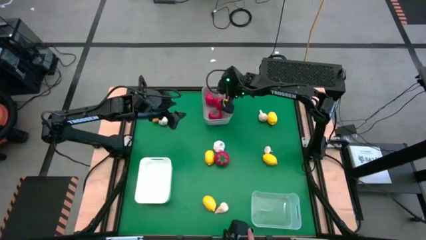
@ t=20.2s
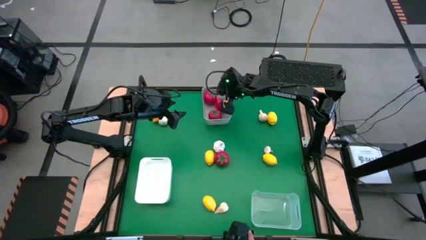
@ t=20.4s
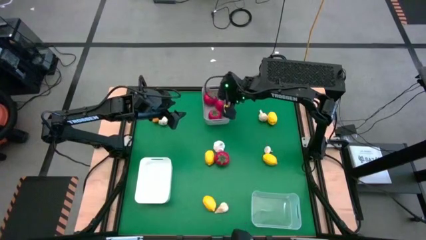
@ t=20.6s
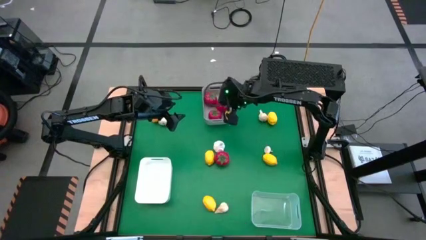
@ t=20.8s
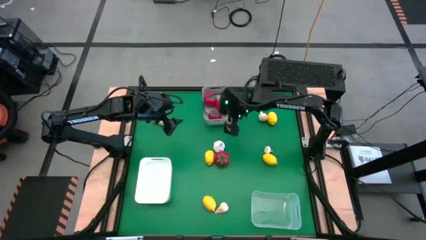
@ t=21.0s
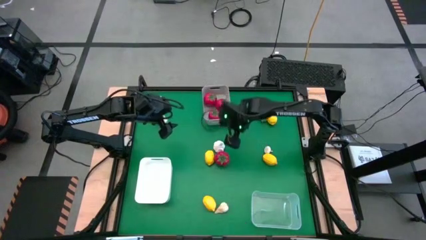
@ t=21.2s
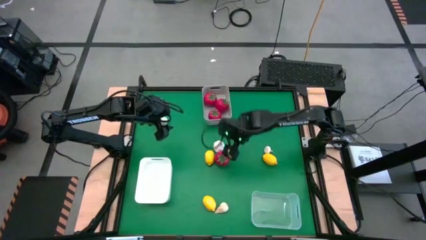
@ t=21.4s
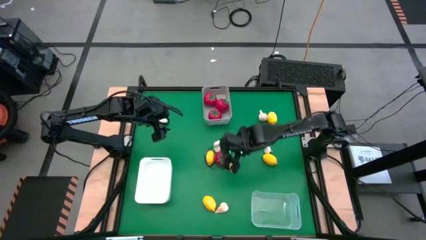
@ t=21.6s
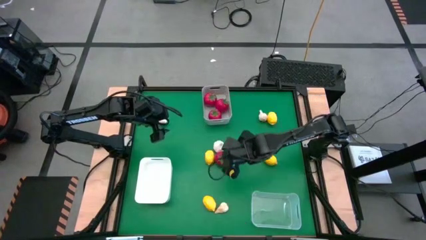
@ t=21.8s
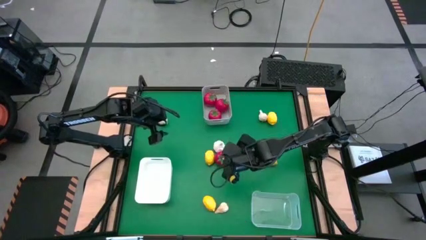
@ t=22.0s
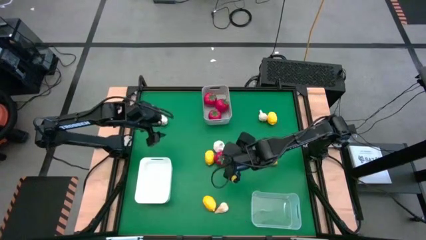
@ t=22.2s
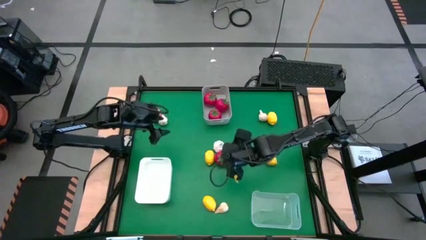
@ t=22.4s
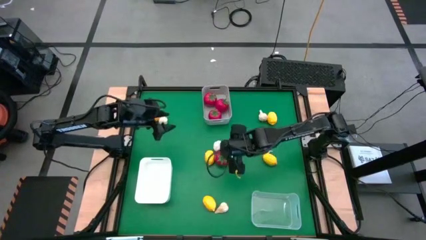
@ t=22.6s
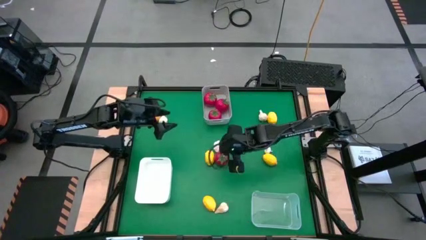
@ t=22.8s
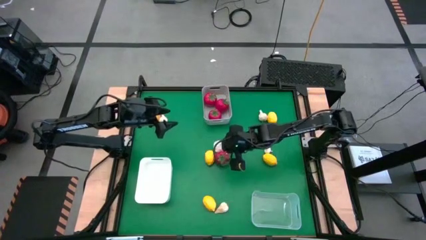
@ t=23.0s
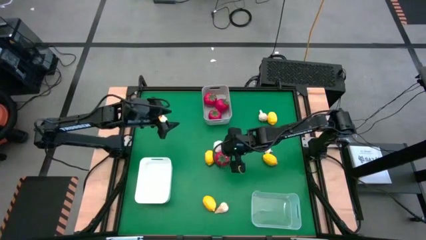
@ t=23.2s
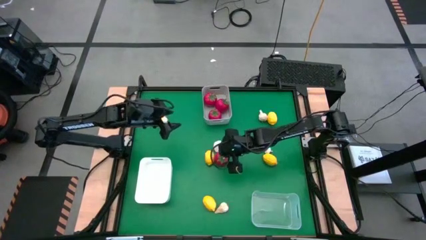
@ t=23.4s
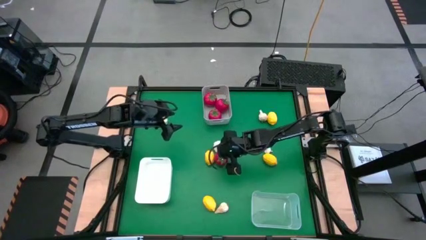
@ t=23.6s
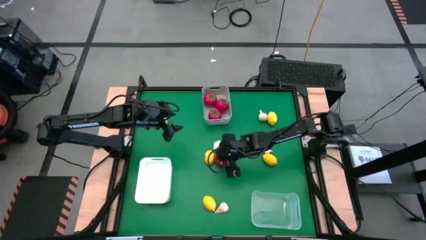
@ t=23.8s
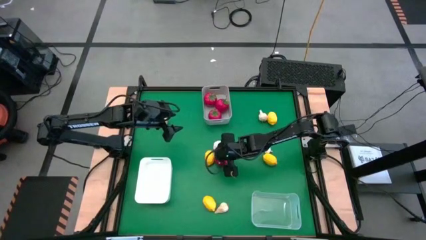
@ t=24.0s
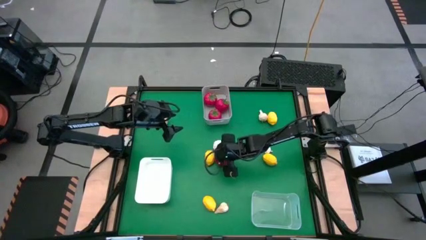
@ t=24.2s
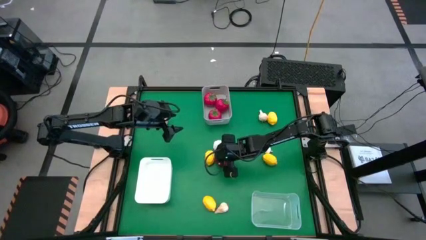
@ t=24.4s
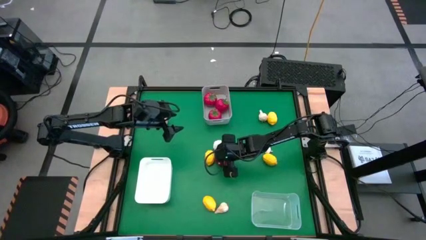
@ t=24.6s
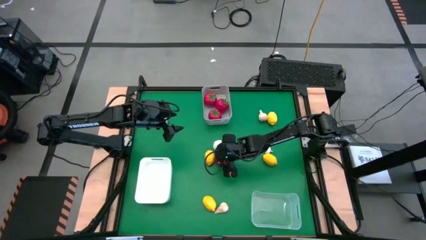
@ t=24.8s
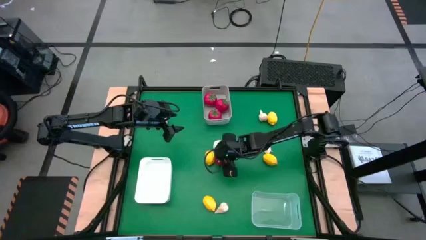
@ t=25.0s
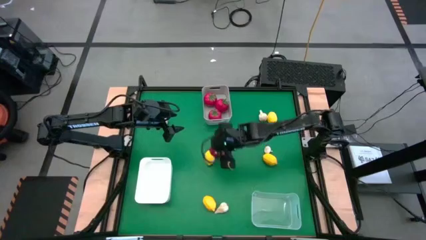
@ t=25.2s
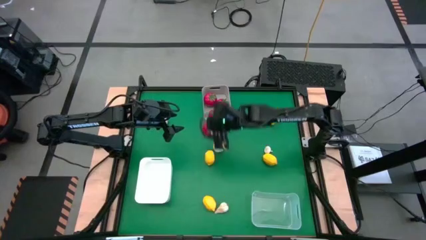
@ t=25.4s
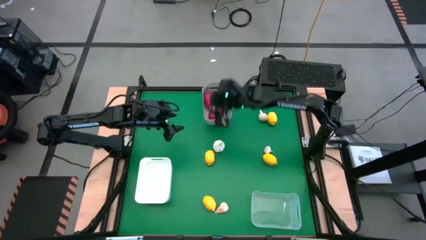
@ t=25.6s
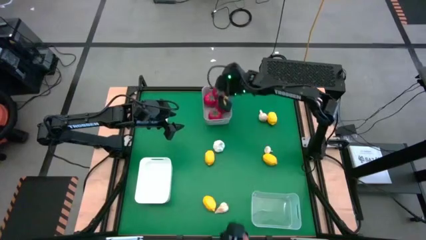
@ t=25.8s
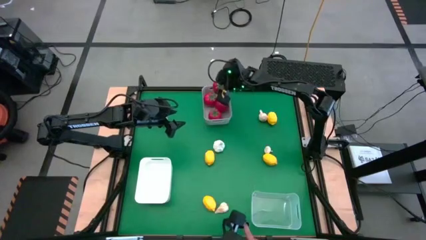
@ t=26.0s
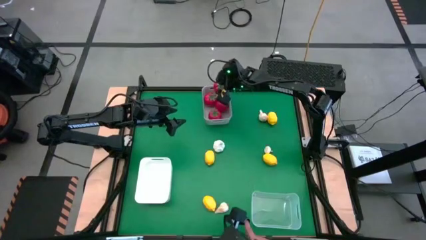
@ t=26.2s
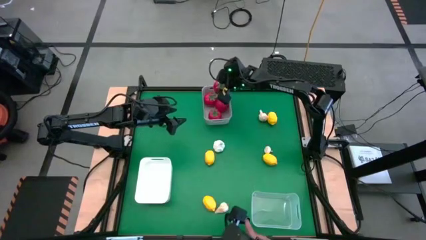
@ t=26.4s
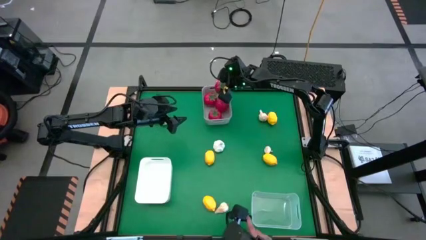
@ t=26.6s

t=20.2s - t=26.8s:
Task: Sort produce into baskets
Put the tomato into the gray bin

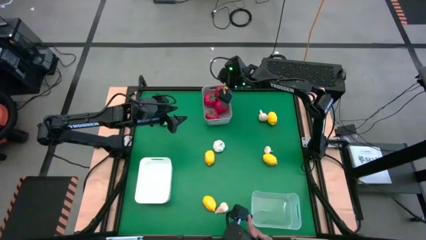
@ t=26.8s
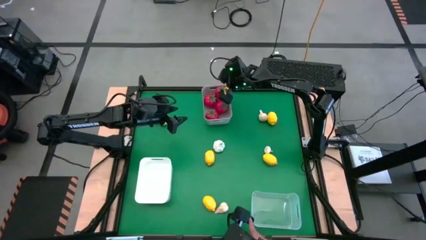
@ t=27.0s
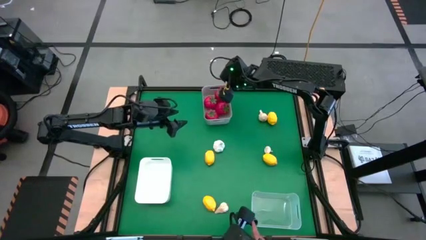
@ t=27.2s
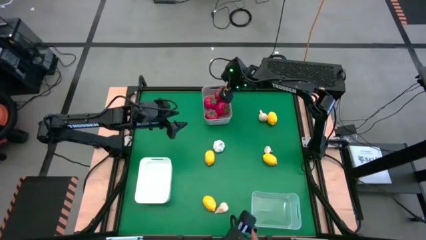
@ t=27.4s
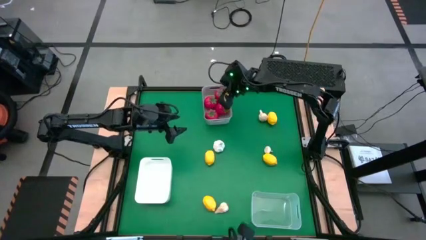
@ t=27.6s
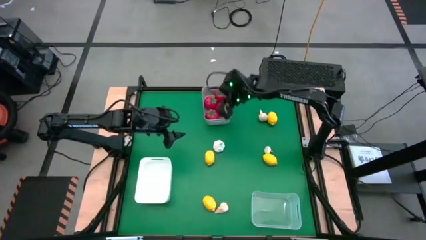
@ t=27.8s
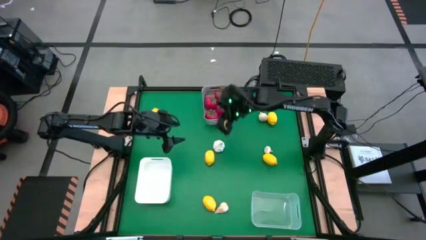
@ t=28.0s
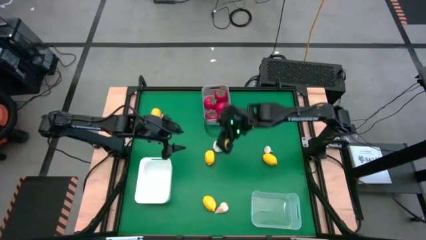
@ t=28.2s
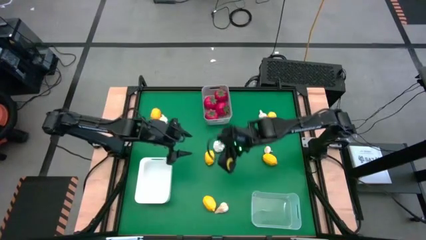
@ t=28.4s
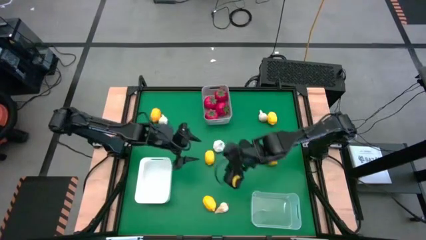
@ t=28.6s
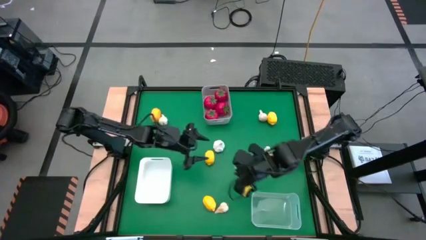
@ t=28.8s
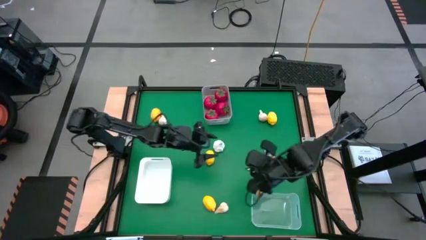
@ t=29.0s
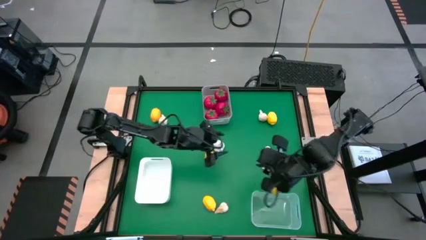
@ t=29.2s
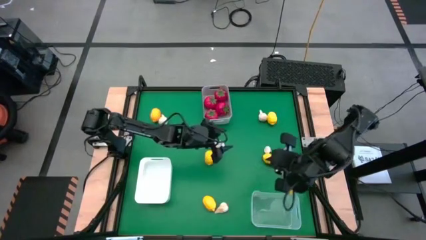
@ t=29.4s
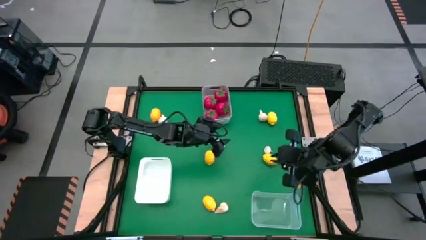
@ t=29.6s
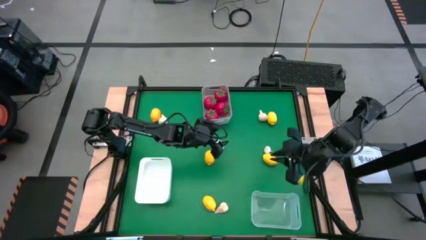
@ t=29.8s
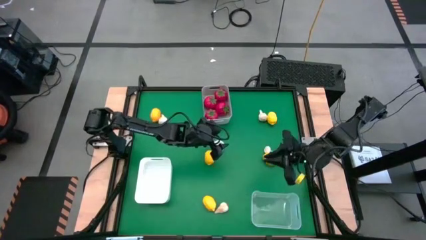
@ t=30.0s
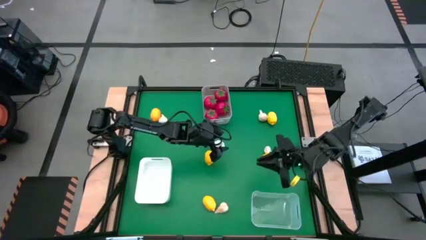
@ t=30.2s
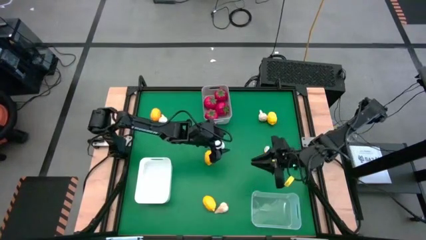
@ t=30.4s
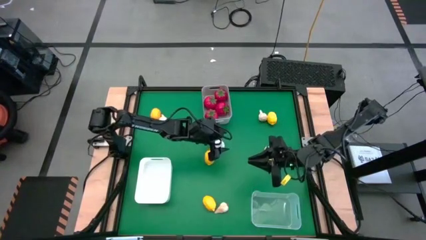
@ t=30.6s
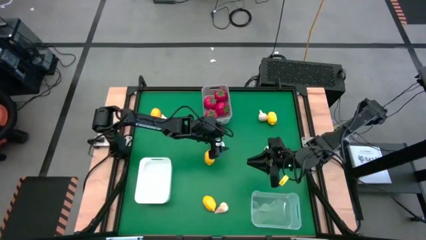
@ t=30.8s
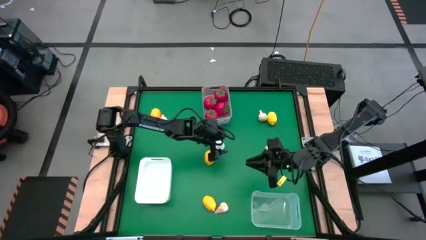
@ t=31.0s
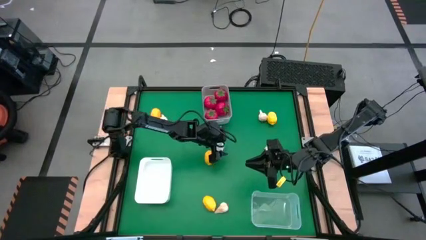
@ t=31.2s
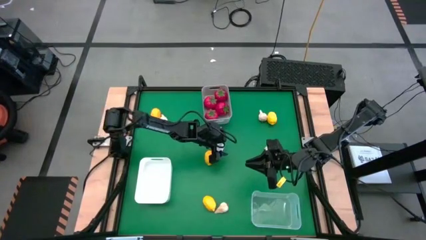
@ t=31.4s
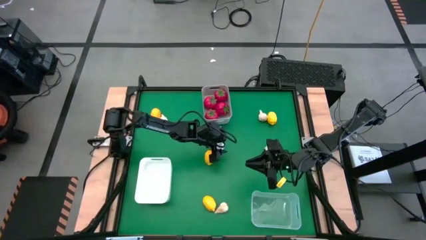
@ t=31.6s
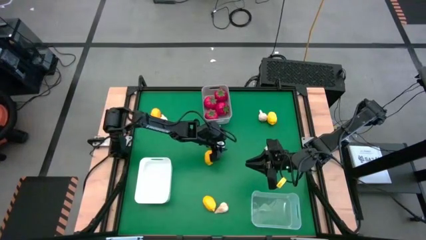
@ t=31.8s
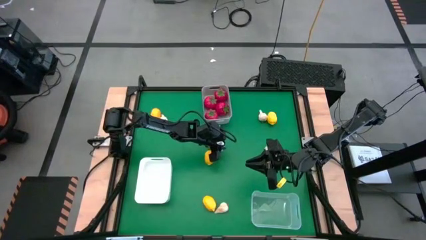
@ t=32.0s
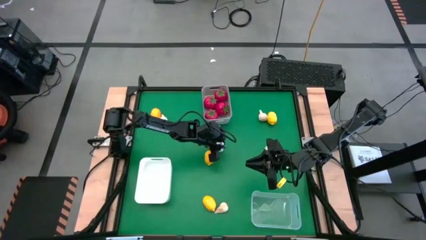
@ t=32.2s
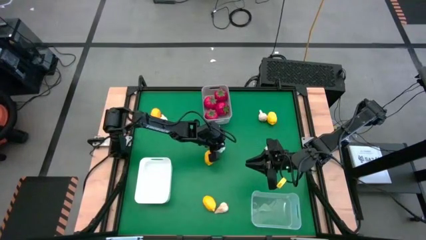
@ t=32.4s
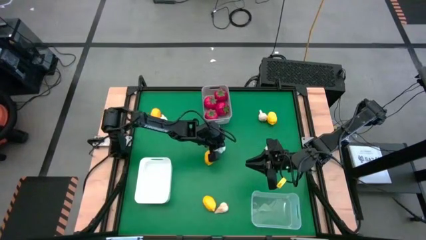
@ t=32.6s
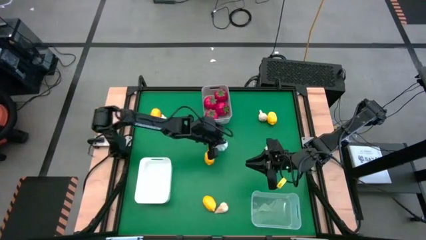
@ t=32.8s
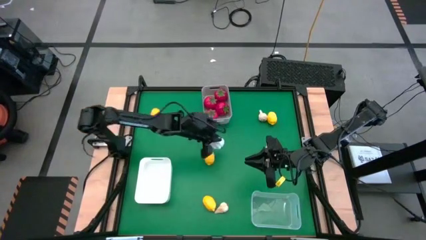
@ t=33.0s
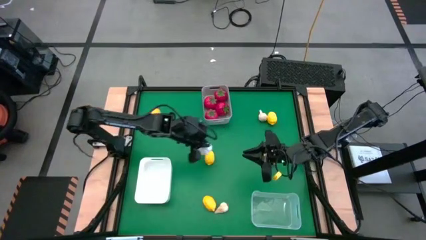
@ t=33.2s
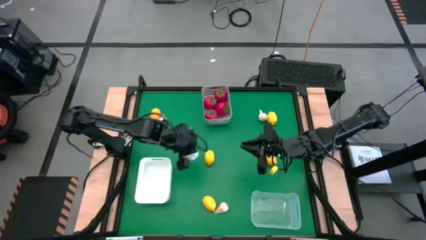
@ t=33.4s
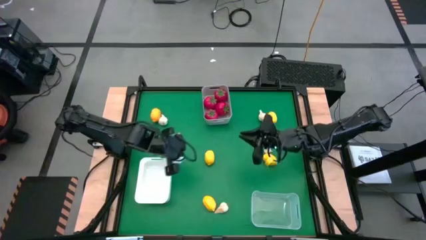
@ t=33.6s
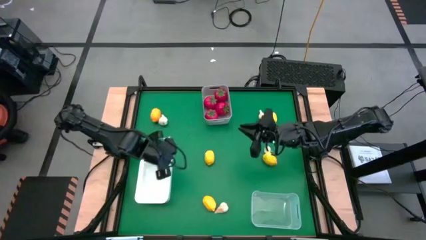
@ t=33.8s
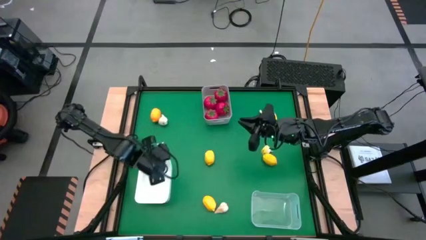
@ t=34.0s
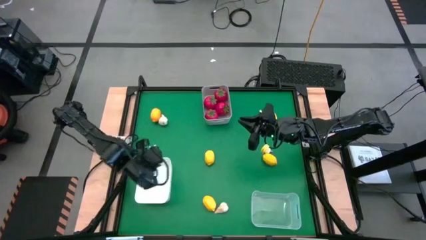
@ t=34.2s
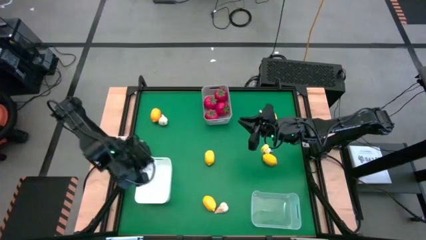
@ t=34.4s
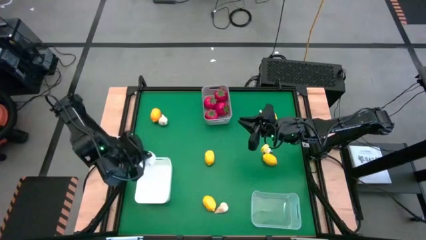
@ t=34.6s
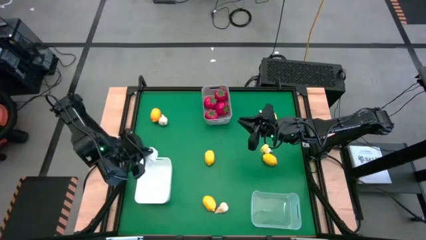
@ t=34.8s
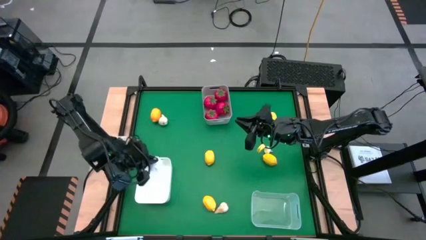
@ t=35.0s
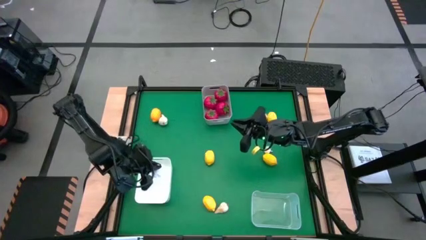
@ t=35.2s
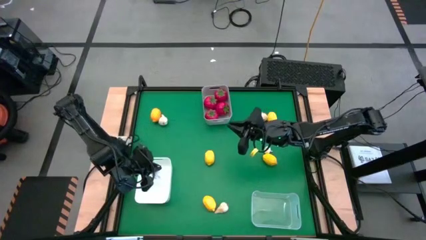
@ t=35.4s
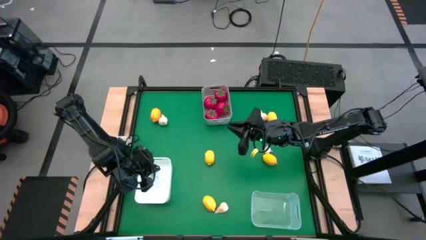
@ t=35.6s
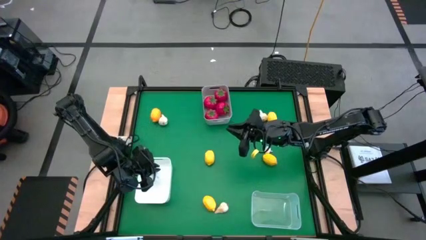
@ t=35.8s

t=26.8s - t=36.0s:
Put the garlic into the white bin
